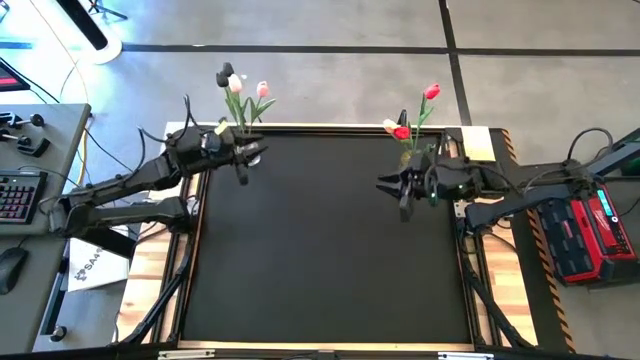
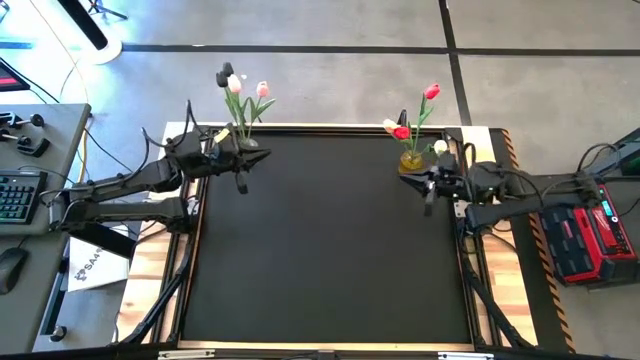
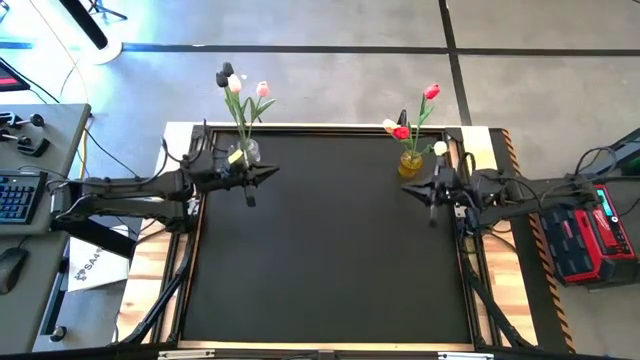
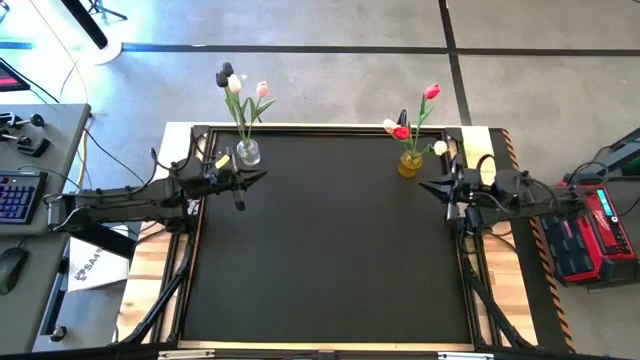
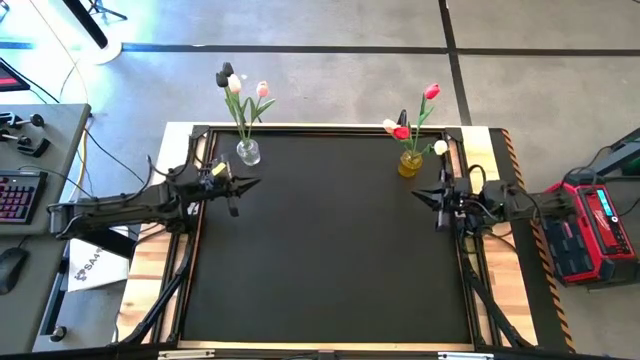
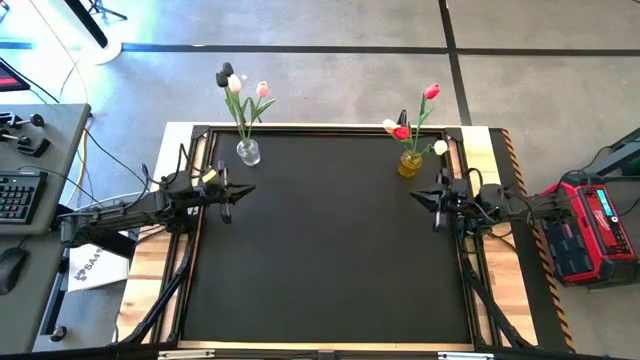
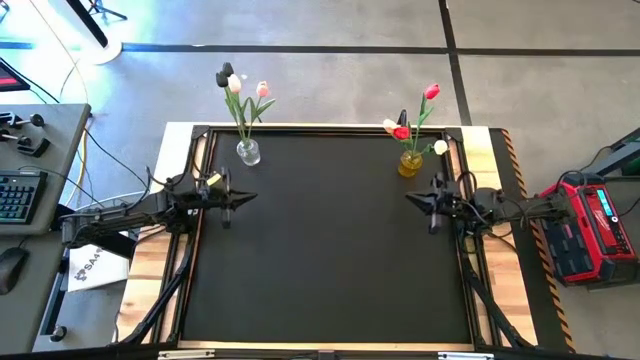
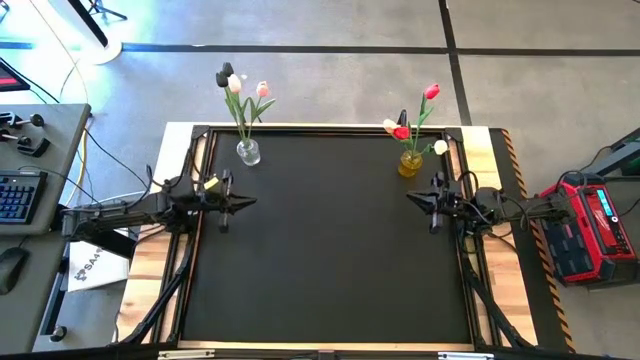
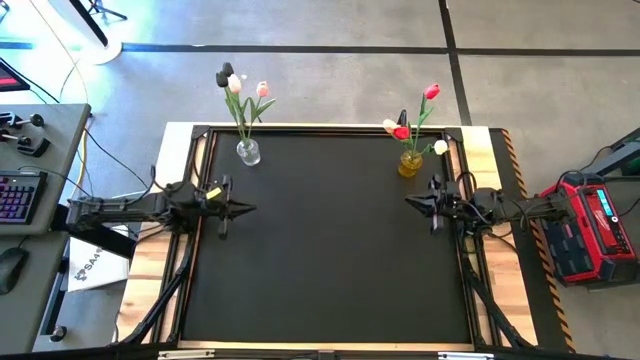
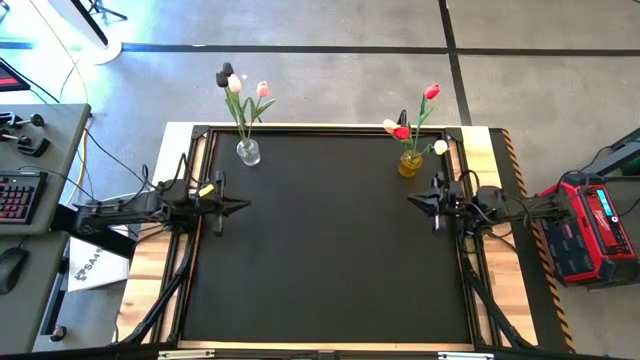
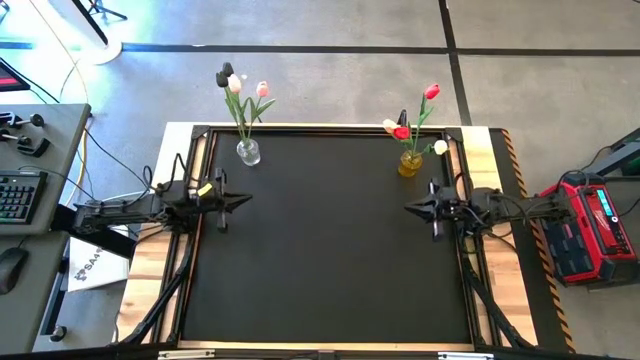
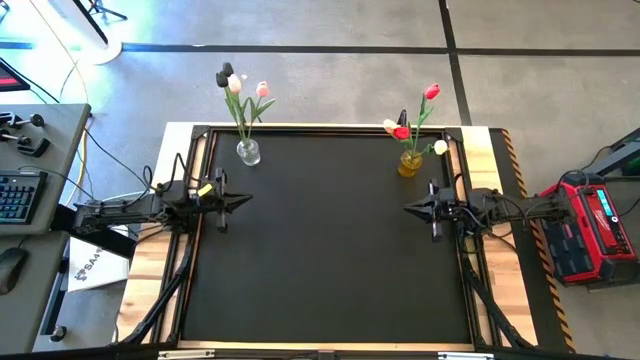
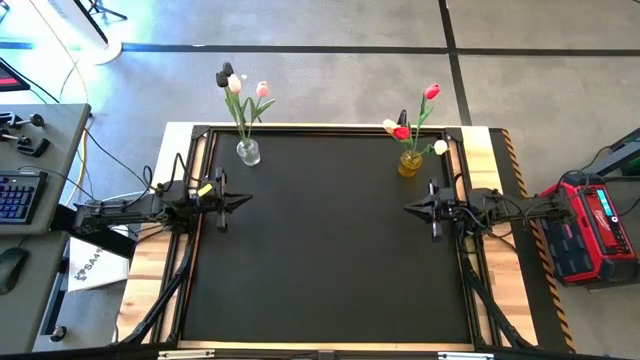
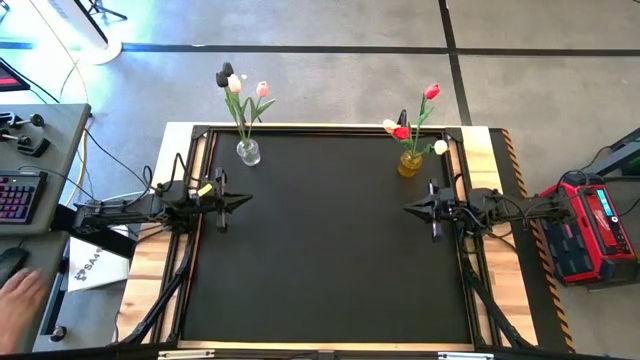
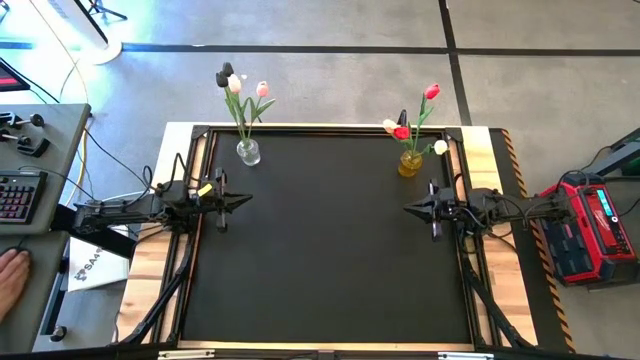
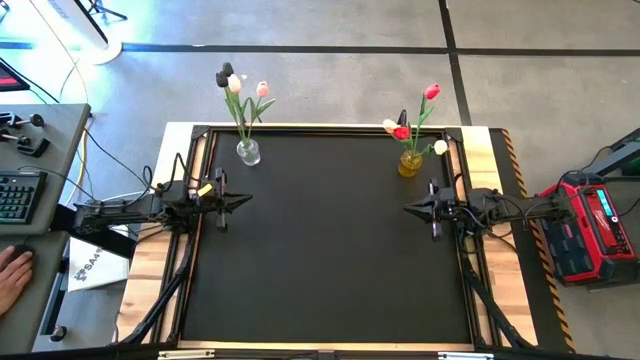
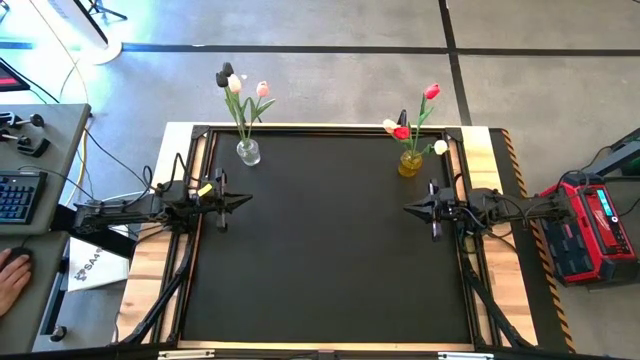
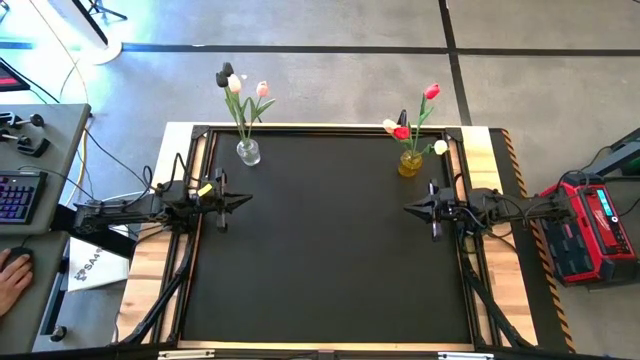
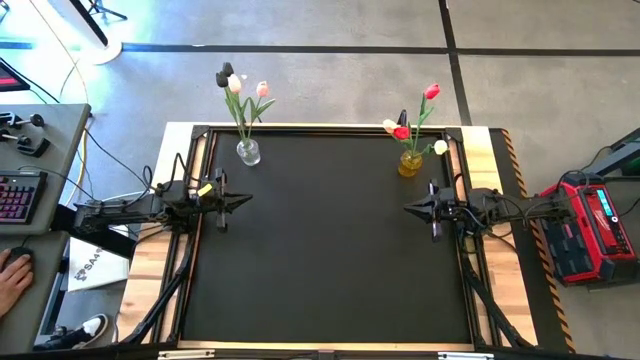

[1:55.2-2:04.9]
Task: Sort flowers into vase by color
Return to Home Position

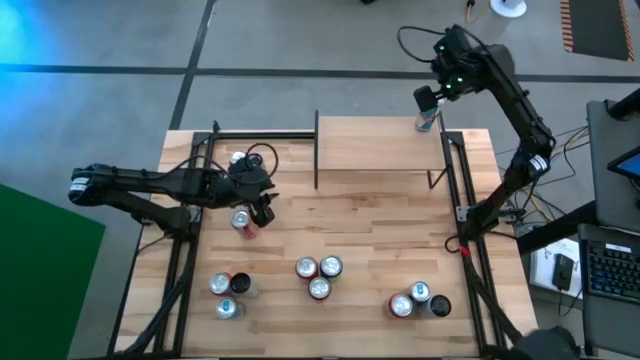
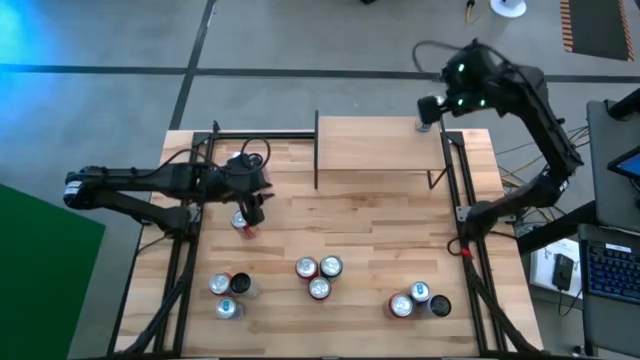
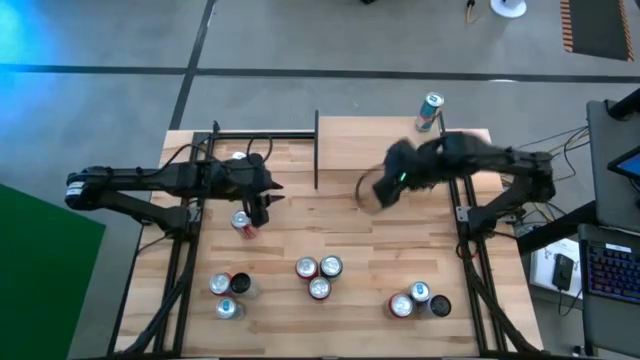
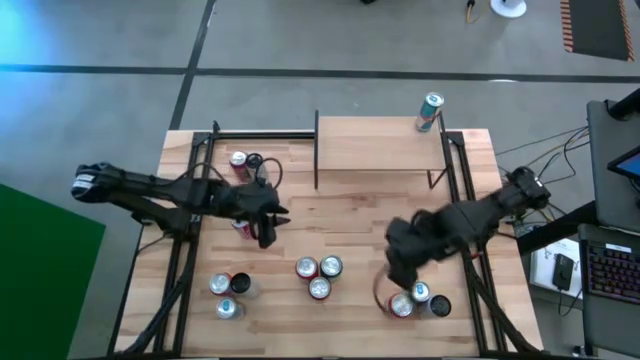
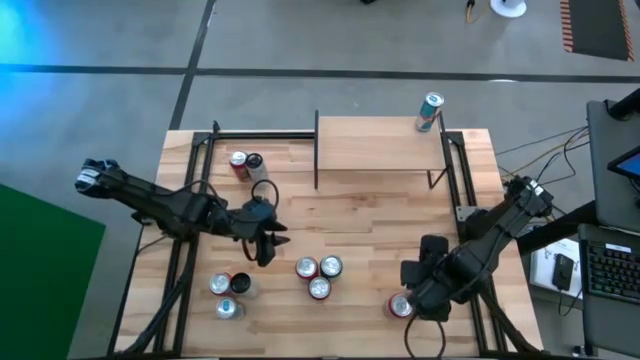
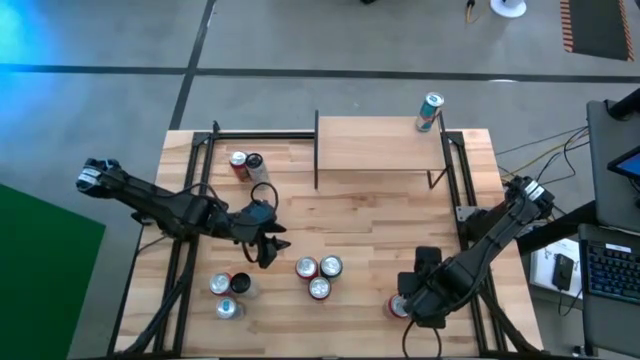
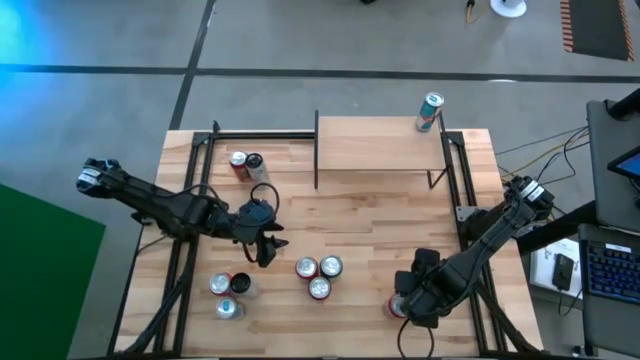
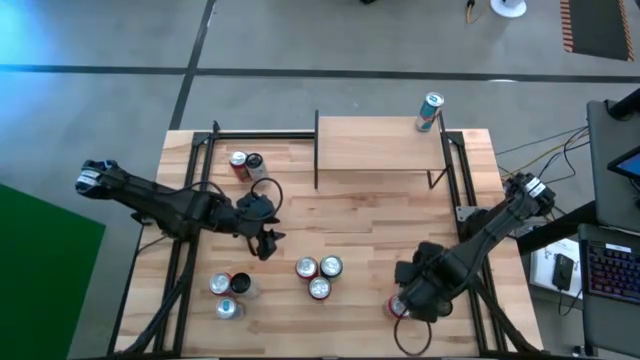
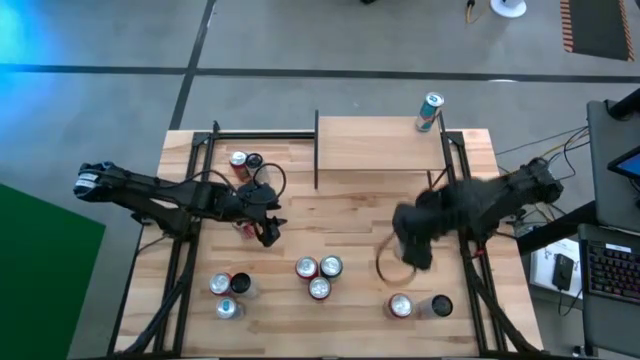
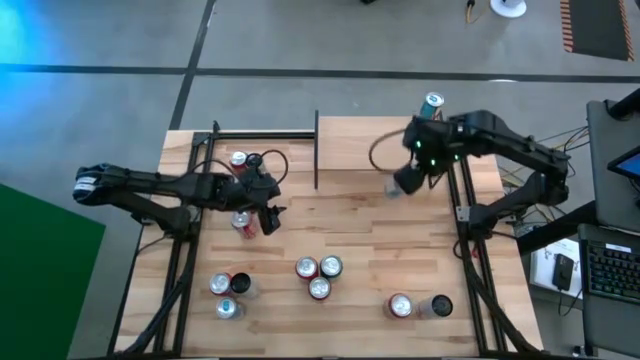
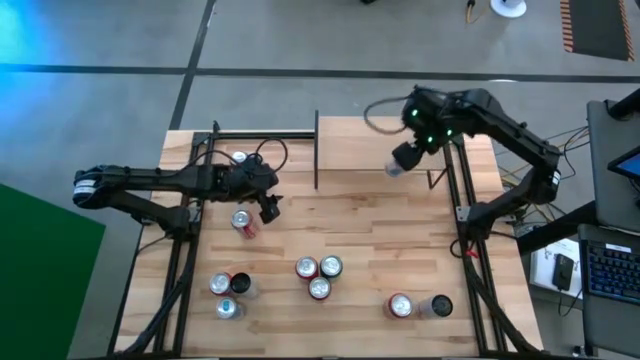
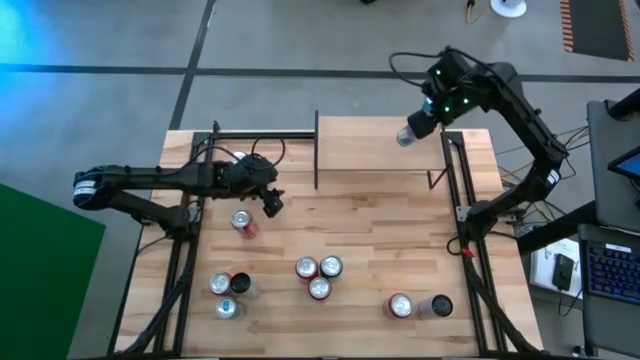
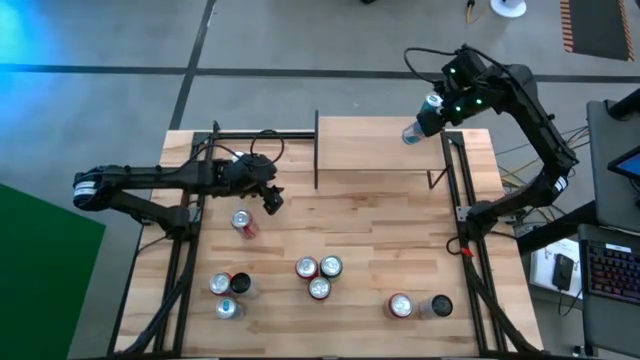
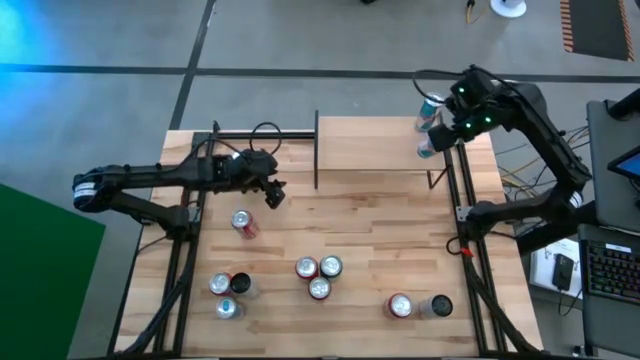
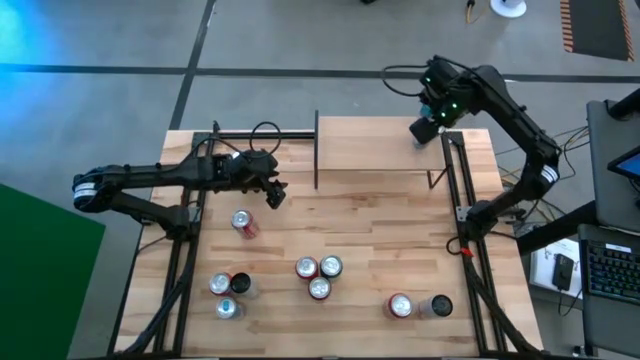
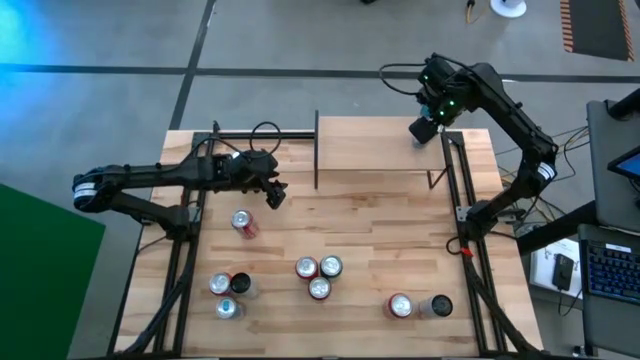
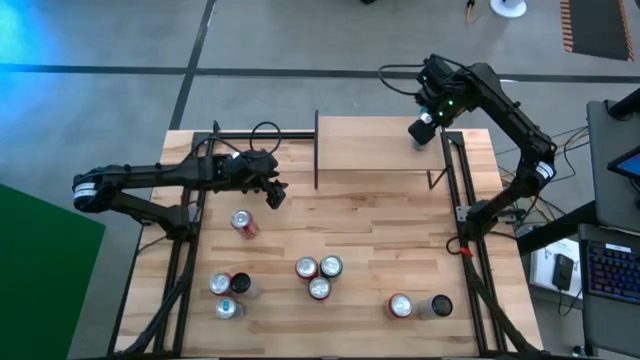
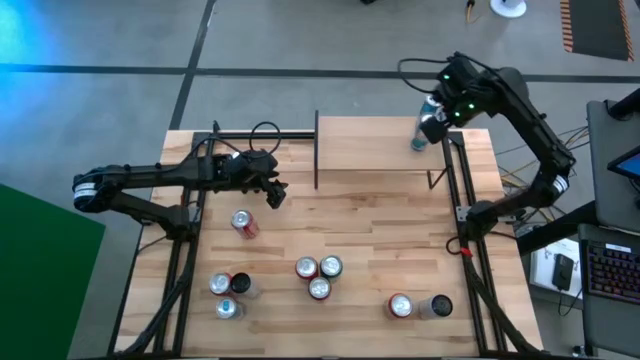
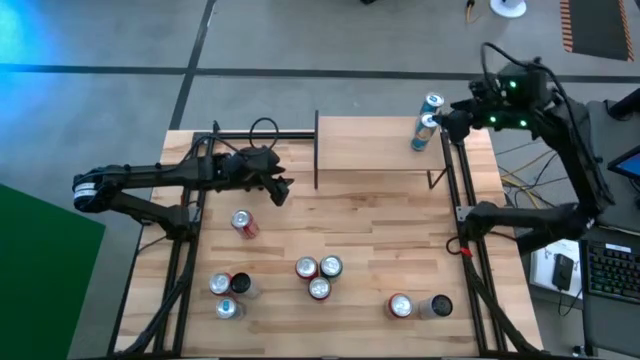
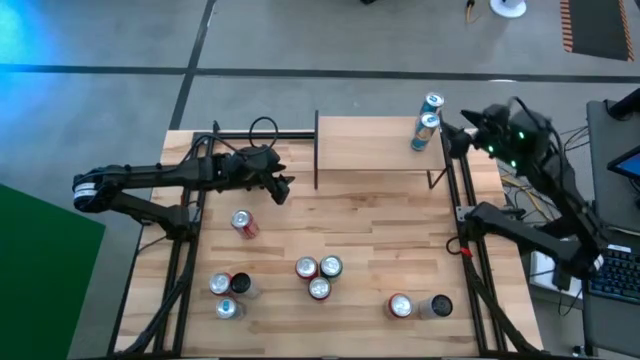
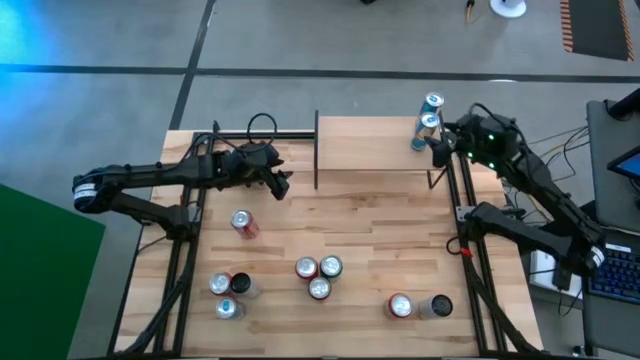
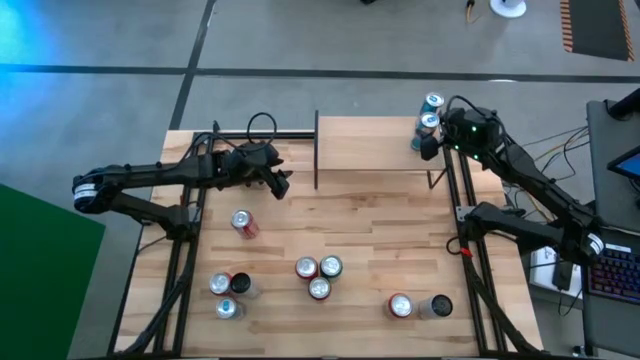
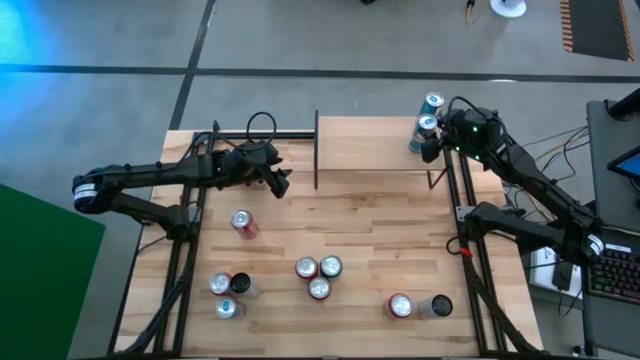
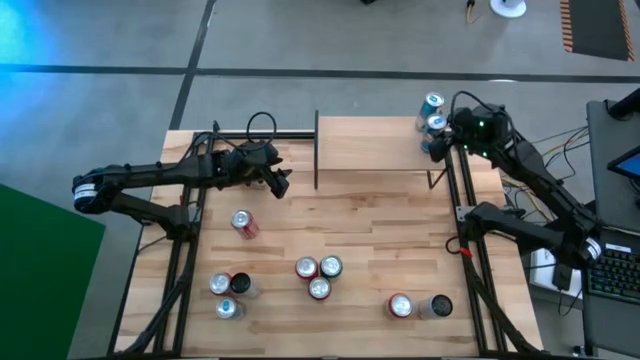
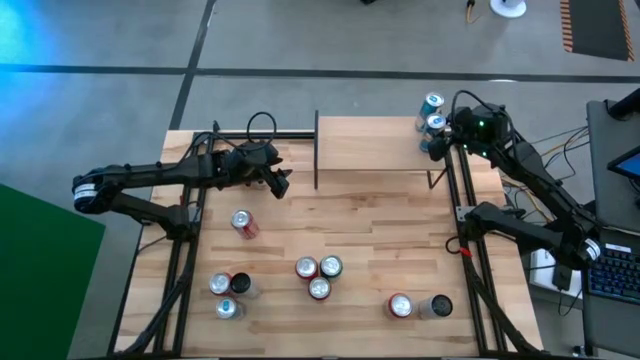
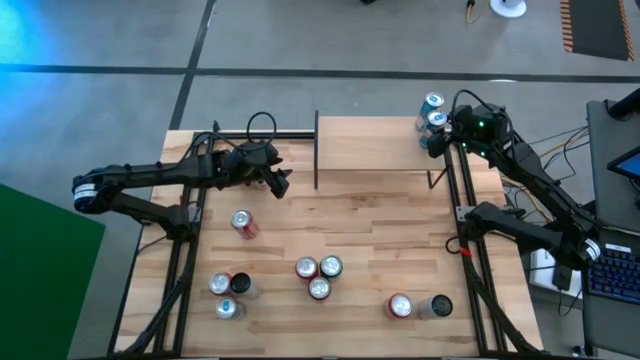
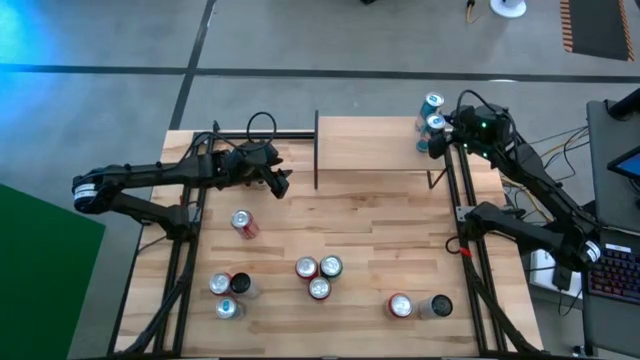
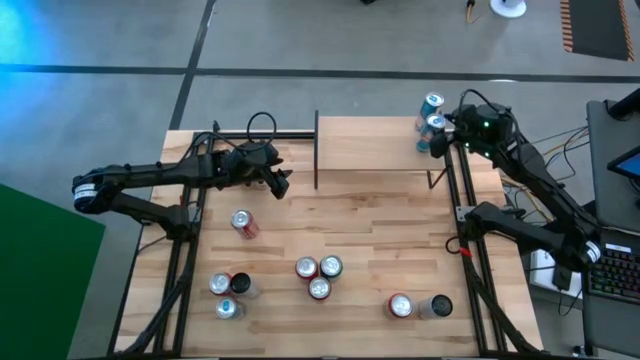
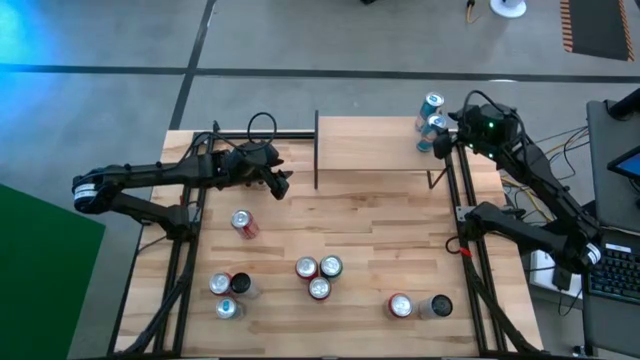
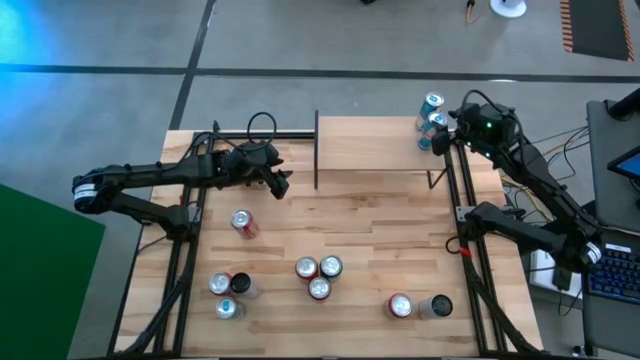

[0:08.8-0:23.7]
Task: Place canned beverage on shelf
Put the right blue soda can on the shelf aligned with the other blue soda can
